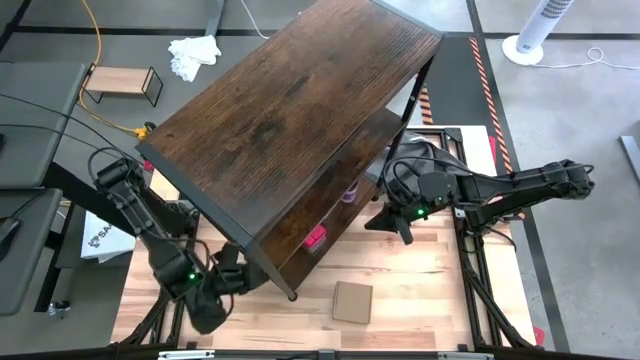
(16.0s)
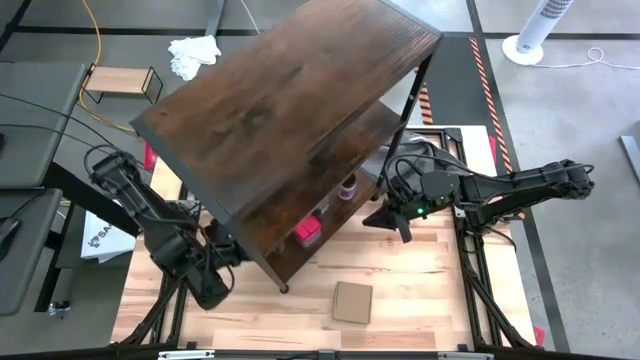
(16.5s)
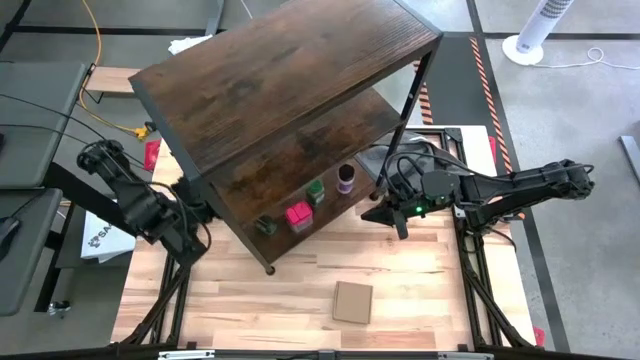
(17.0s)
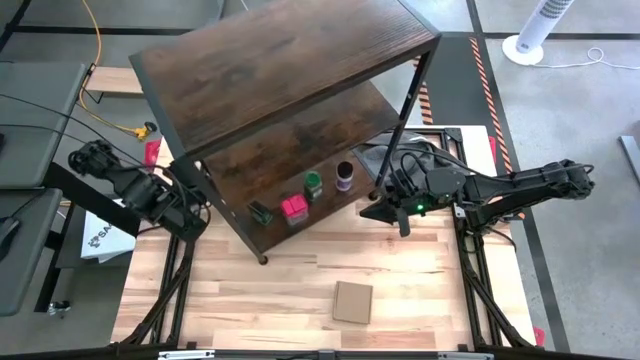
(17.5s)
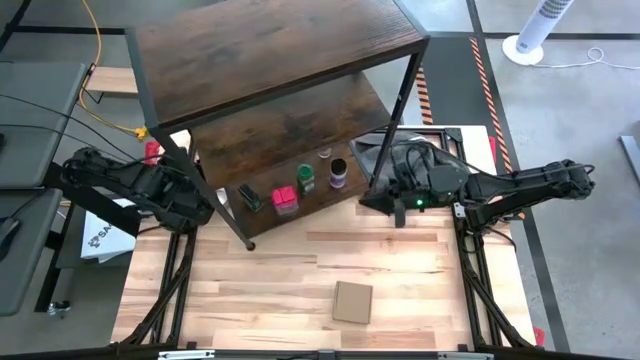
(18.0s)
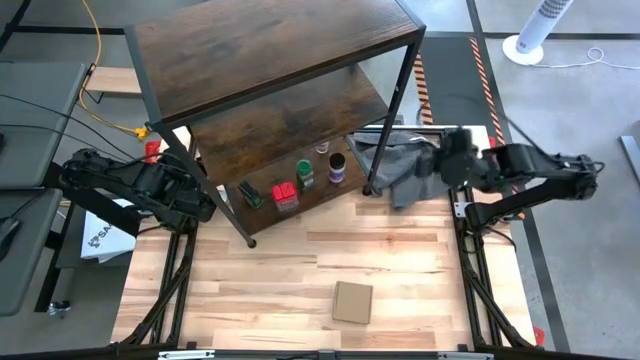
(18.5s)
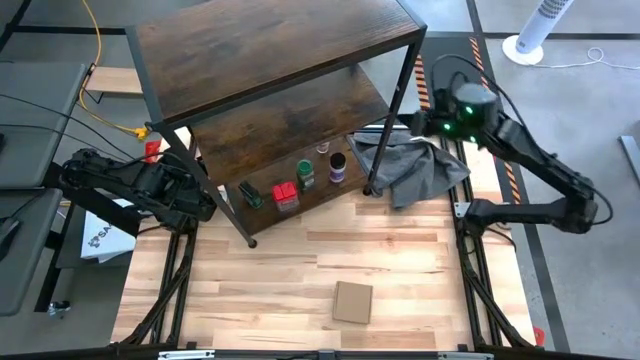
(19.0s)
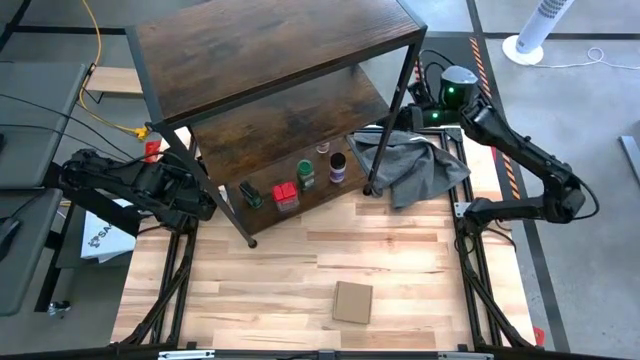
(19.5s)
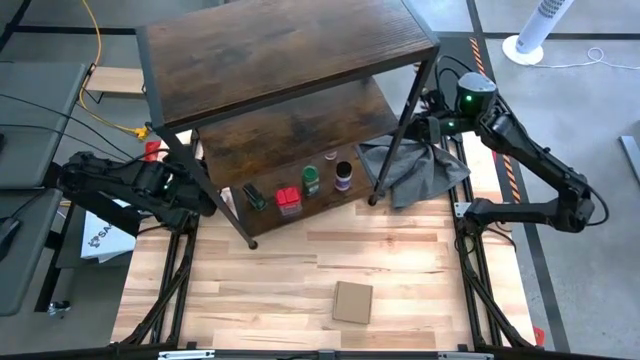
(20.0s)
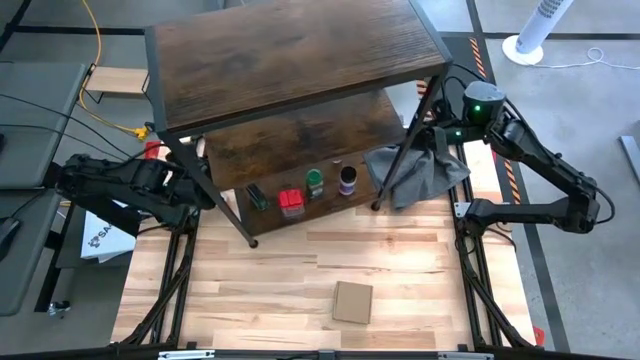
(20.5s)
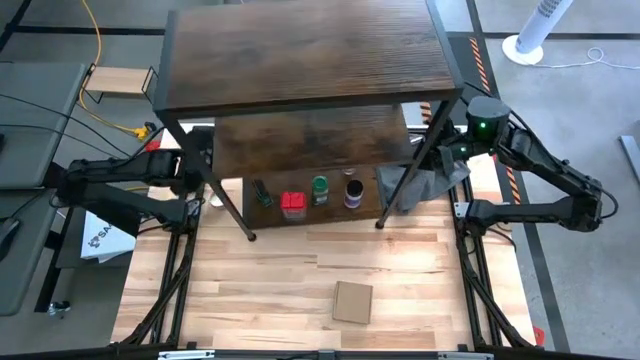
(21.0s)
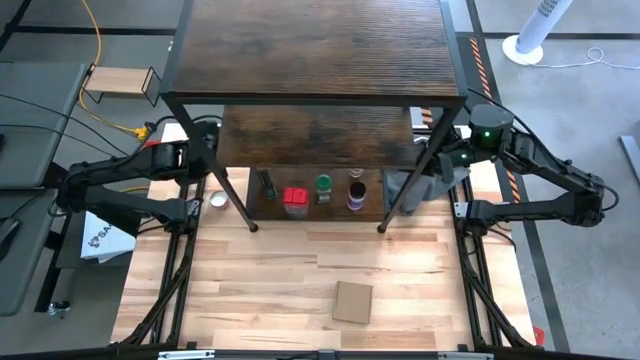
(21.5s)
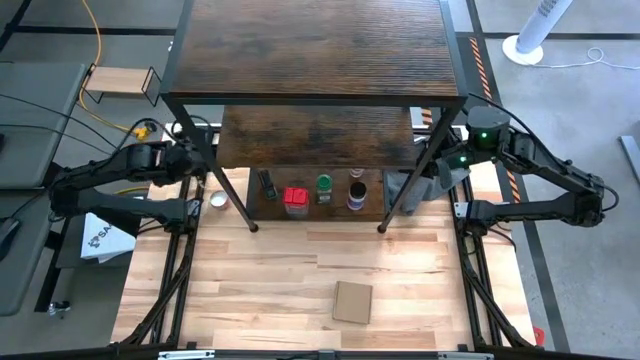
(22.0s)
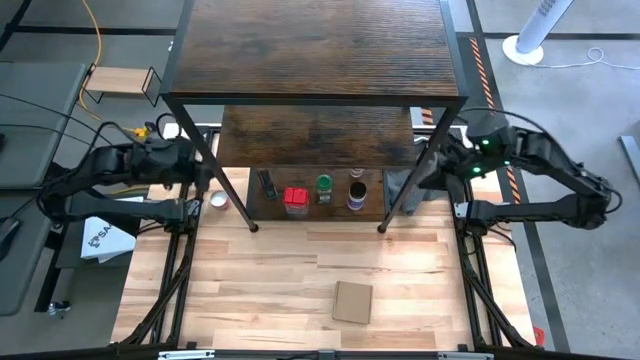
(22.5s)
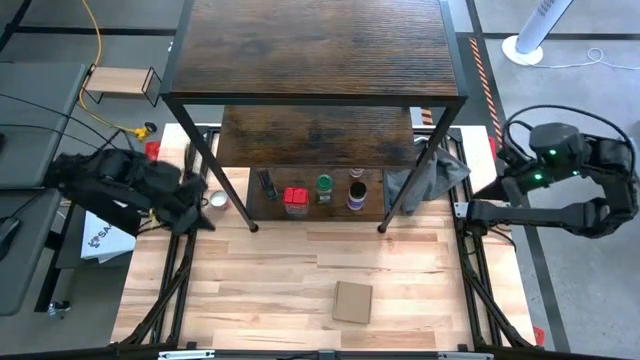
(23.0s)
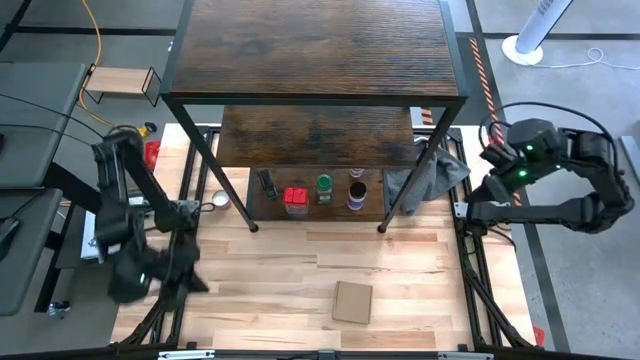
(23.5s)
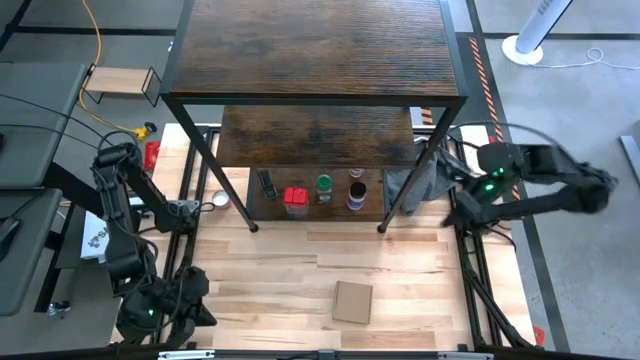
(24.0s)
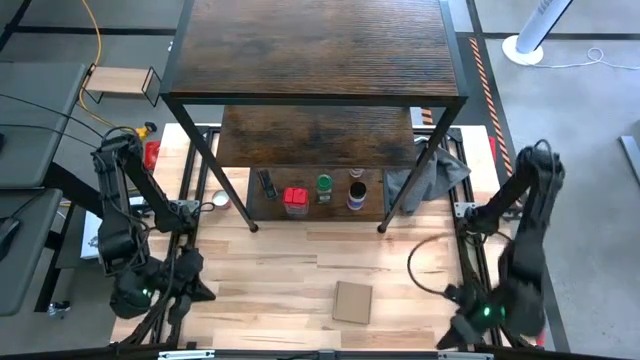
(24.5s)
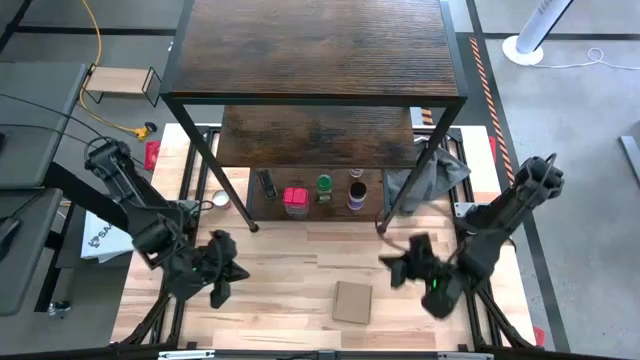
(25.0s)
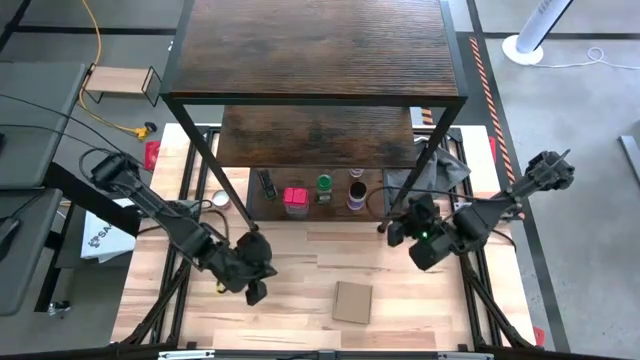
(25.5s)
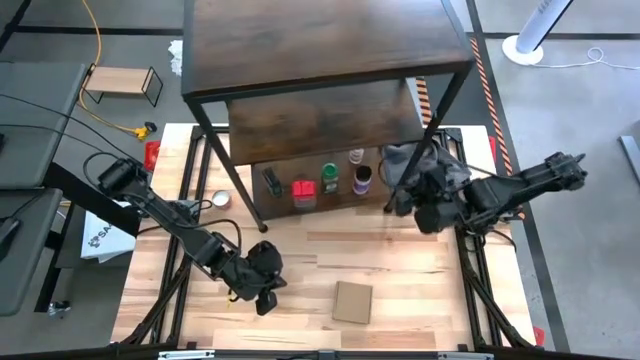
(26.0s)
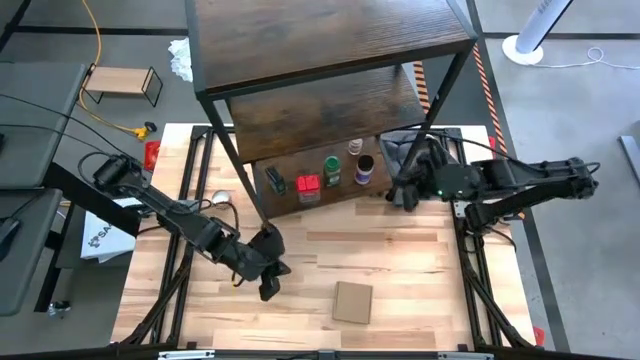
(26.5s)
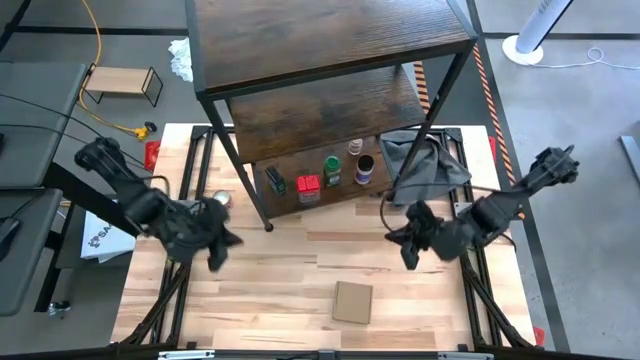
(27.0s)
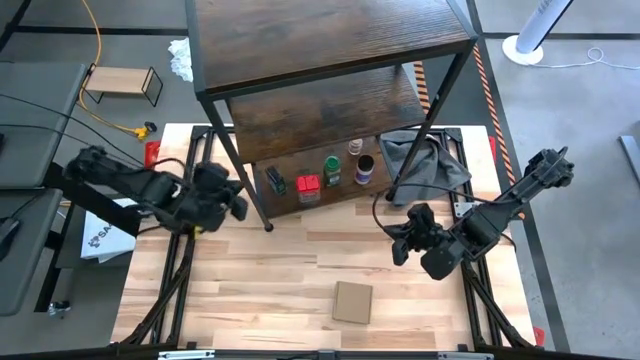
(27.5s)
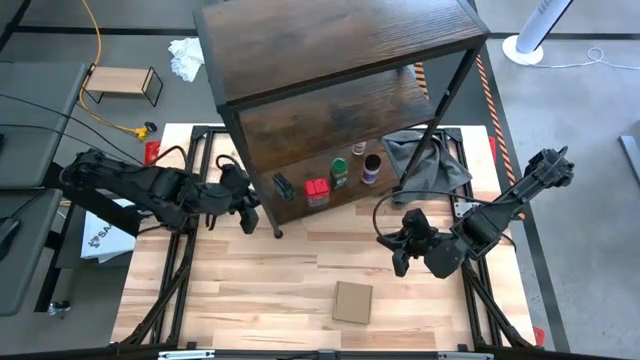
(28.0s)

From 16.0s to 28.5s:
Task: Shelf spices
Move the shelf to the top of the table

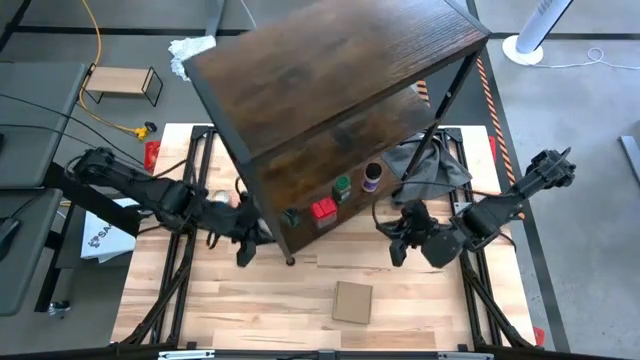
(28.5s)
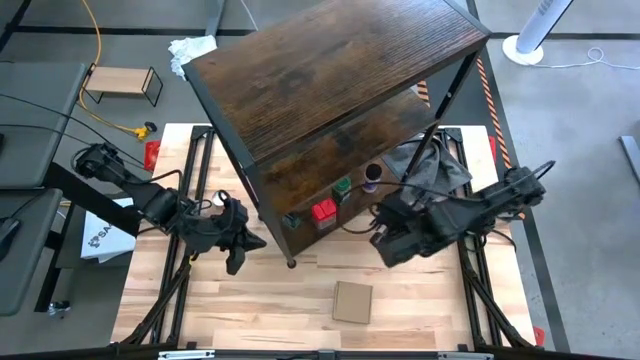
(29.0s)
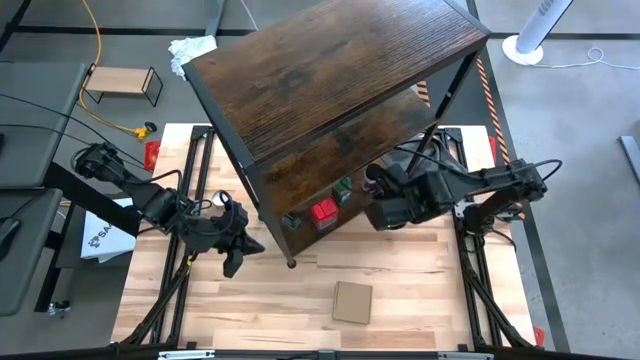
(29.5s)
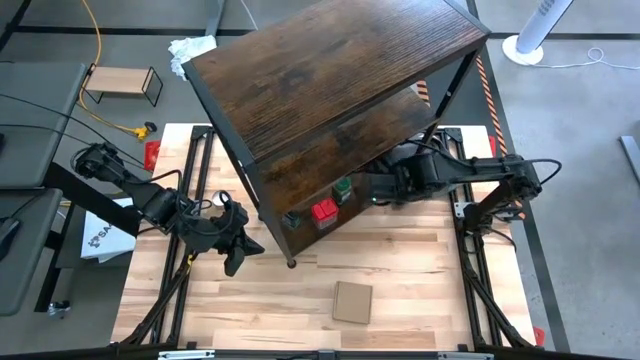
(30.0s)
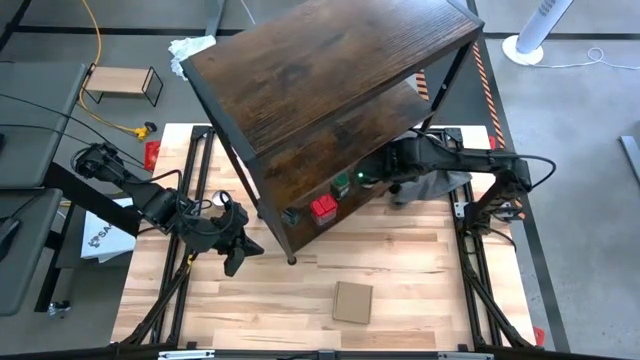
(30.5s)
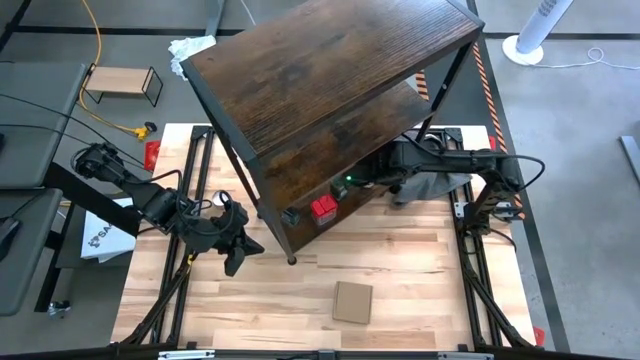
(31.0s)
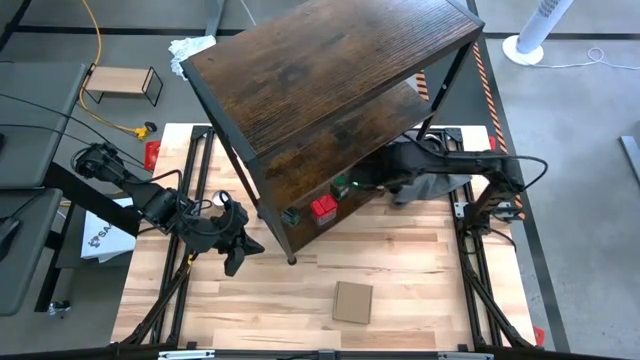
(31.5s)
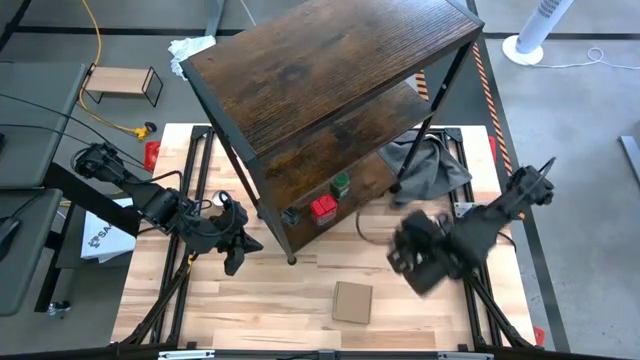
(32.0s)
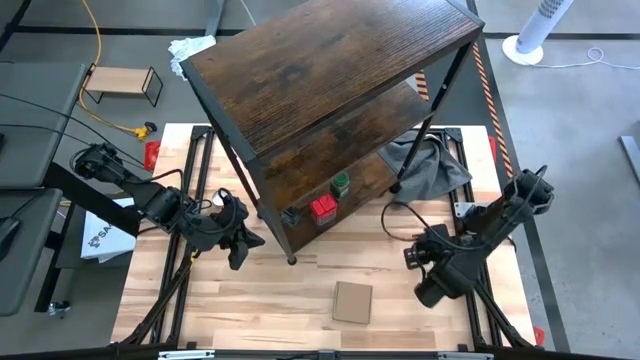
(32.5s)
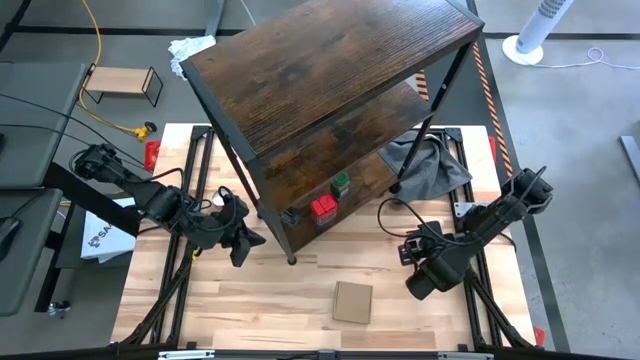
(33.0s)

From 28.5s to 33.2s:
Remove the black seasoning bottle from the shelf

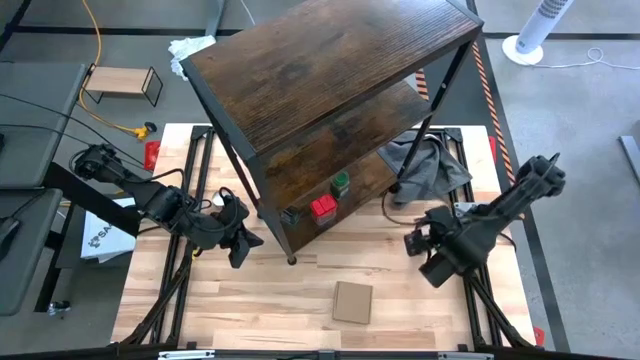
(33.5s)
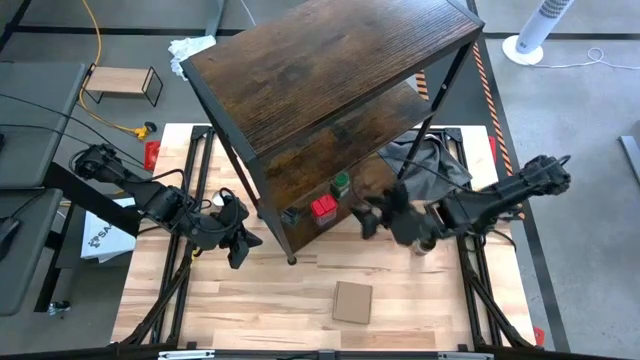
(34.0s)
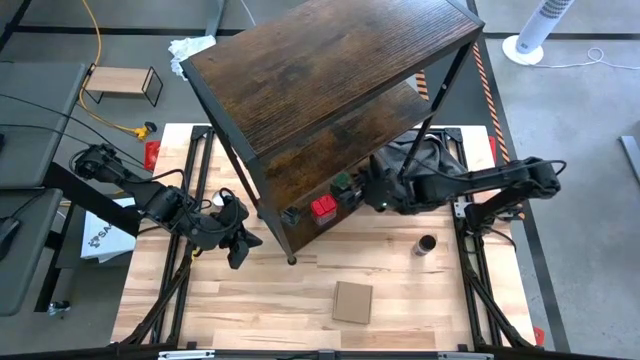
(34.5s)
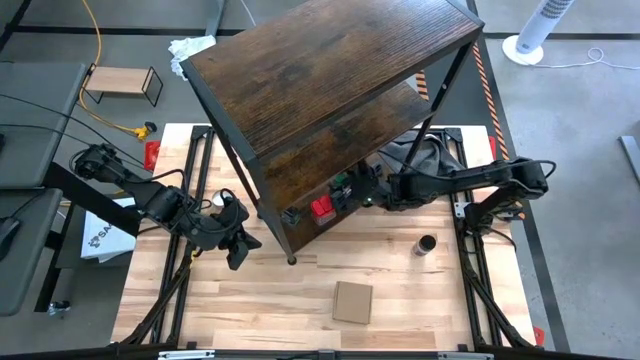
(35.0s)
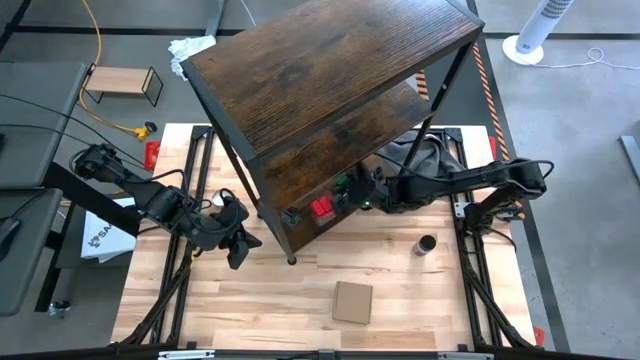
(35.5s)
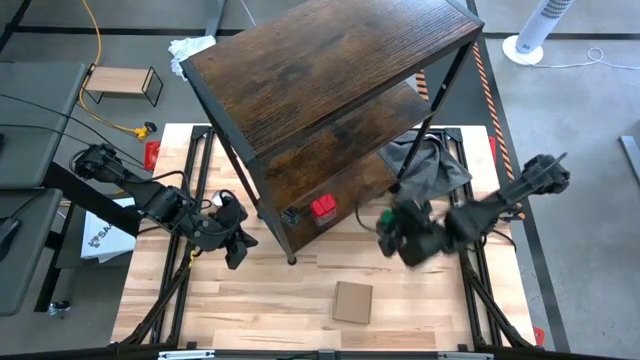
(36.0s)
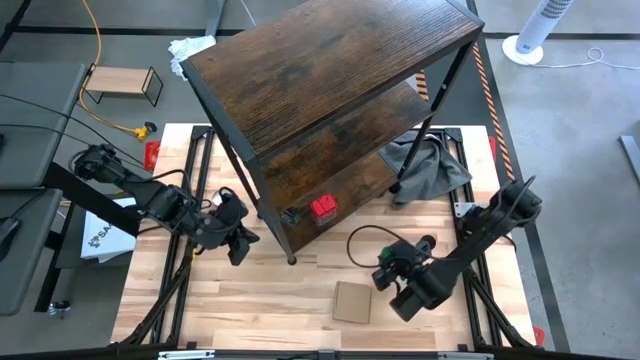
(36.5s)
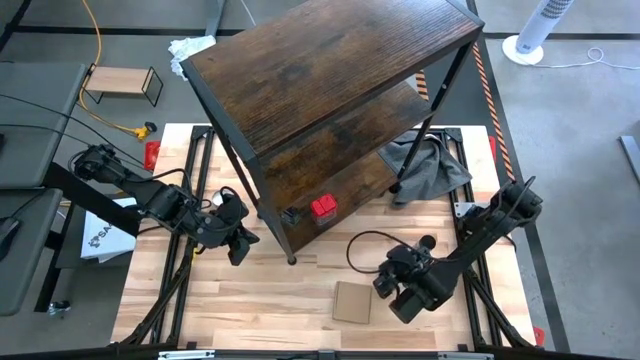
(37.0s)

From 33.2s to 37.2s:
Remove the green seasoning bottle from the shelf
